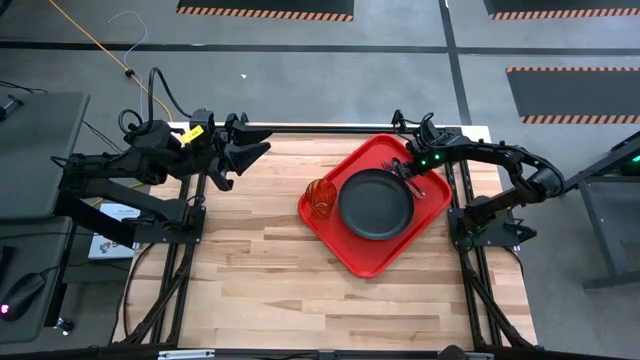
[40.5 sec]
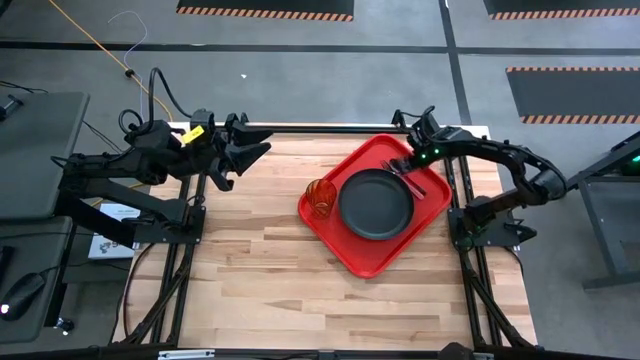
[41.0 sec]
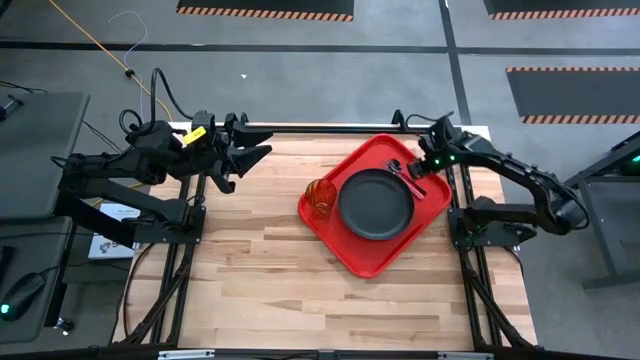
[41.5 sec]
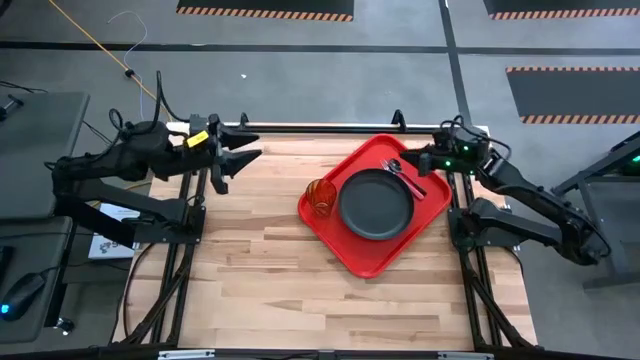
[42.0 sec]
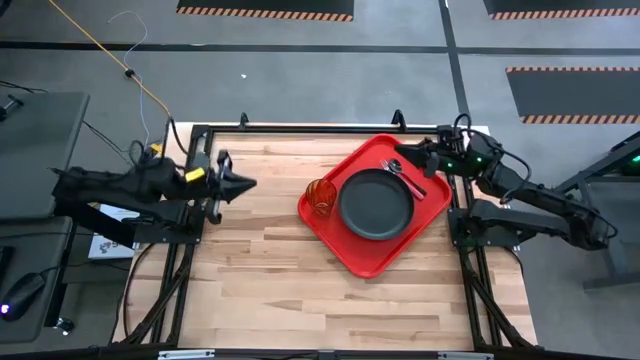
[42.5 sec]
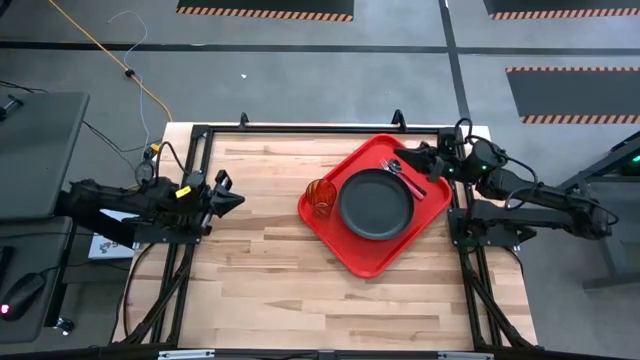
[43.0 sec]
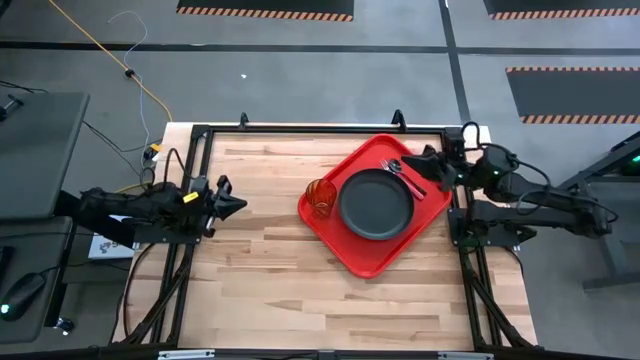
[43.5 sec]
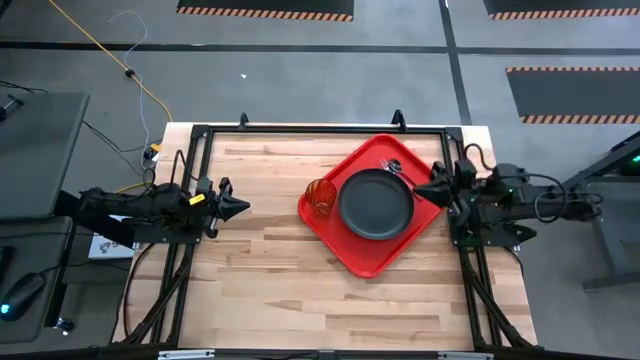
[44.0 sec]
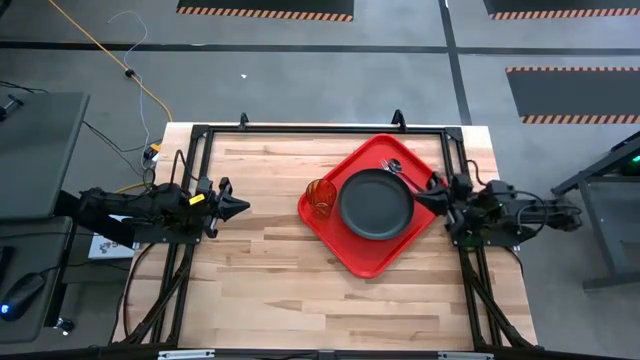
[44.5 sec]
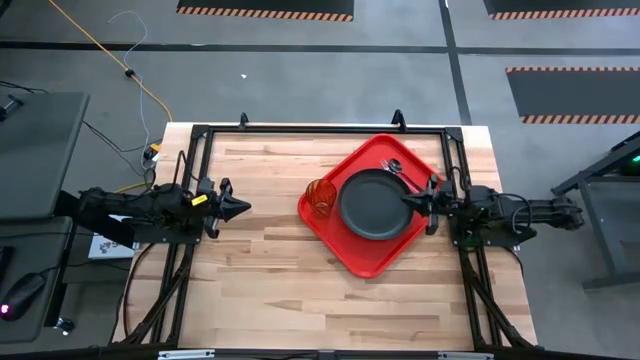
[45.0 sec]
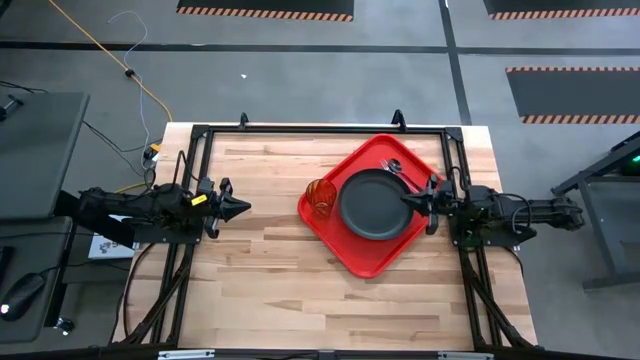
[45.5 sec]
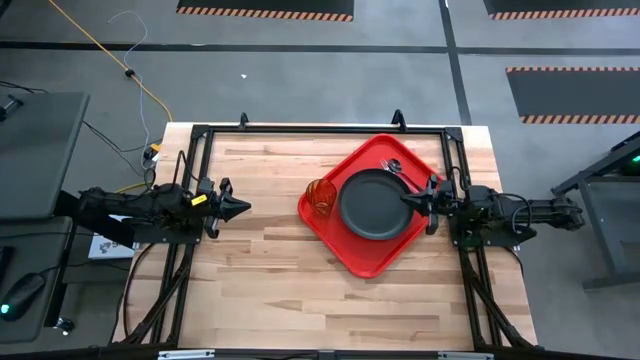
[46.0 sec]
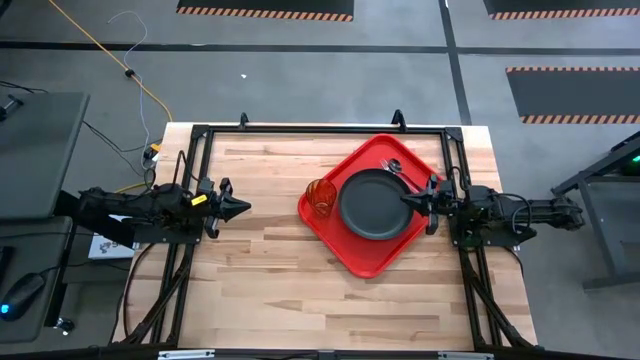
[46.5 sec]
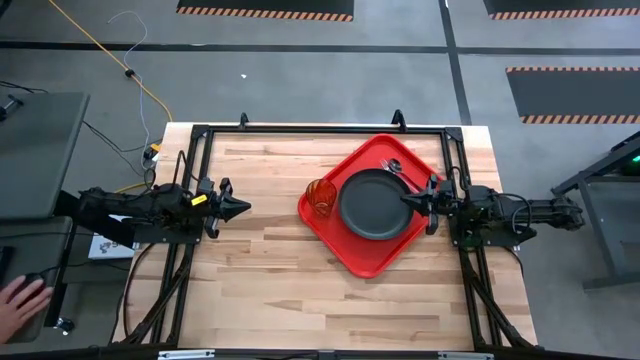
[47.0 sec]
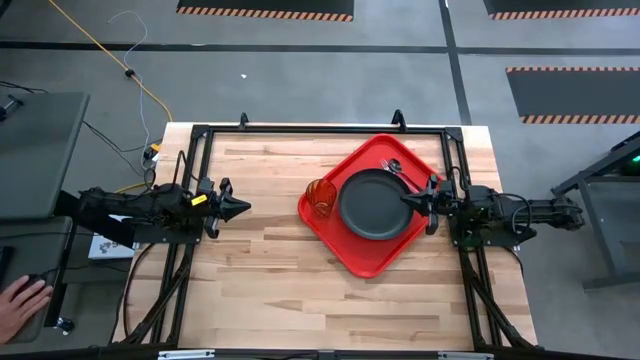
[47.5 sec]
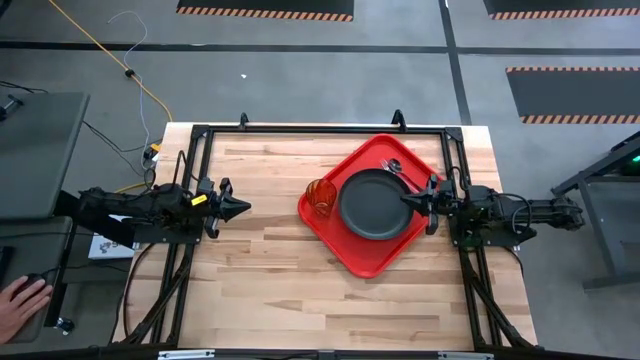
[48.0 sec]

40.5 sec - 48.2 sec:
Task: Pick and place plate/cup/fork/spoon on tray
Return to Home Position

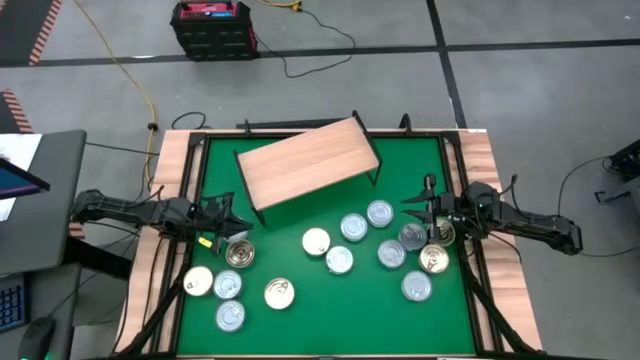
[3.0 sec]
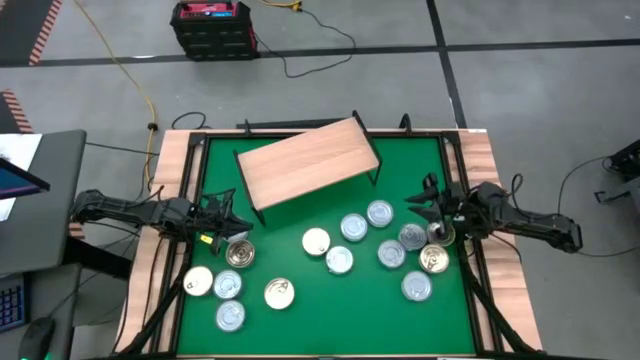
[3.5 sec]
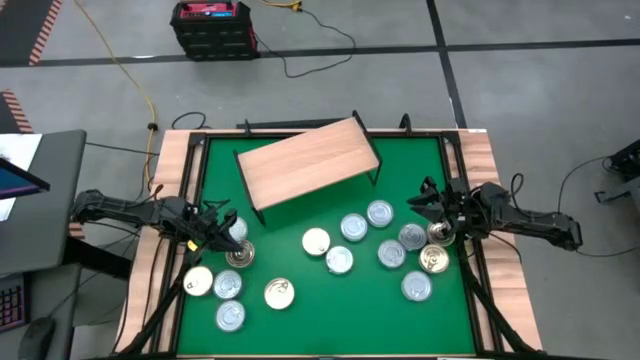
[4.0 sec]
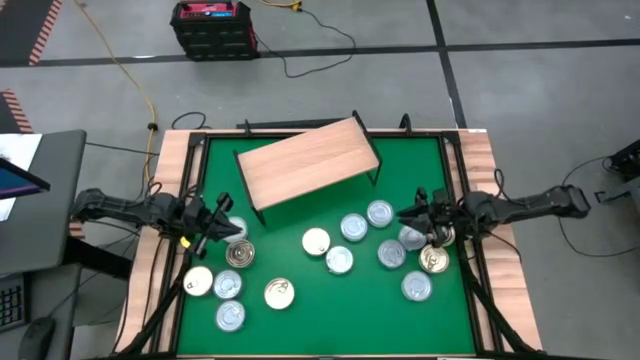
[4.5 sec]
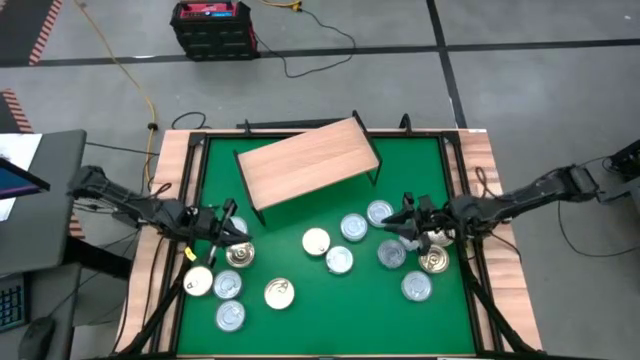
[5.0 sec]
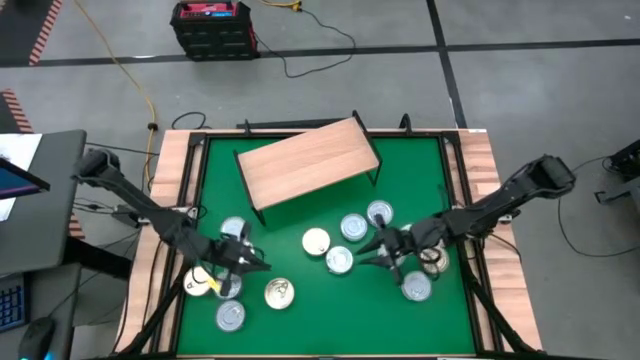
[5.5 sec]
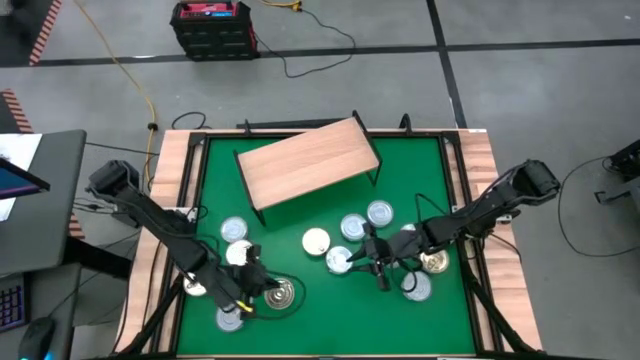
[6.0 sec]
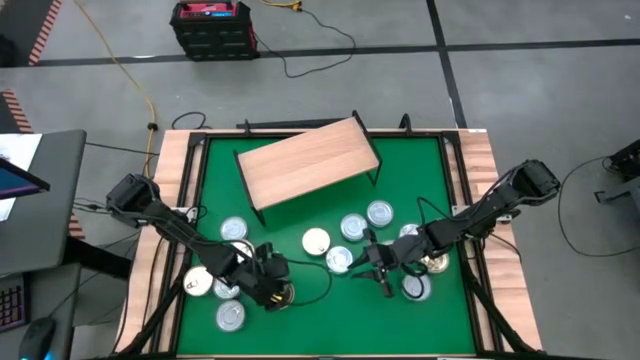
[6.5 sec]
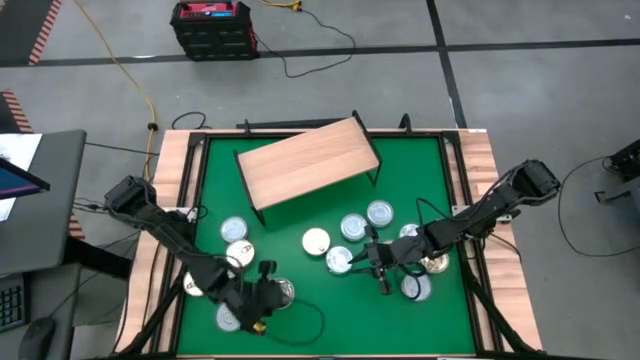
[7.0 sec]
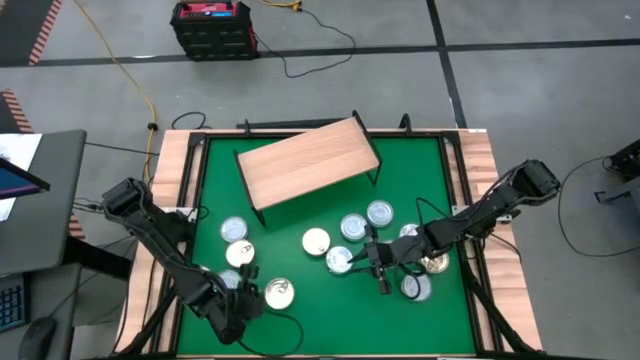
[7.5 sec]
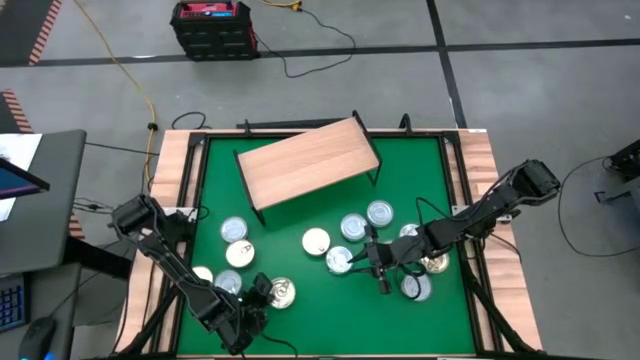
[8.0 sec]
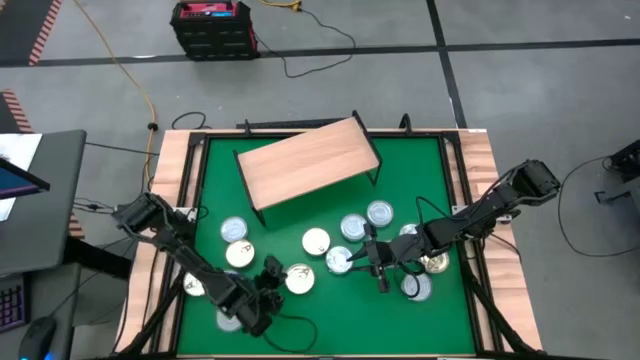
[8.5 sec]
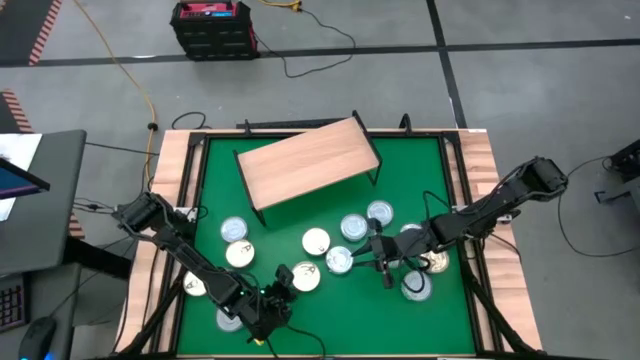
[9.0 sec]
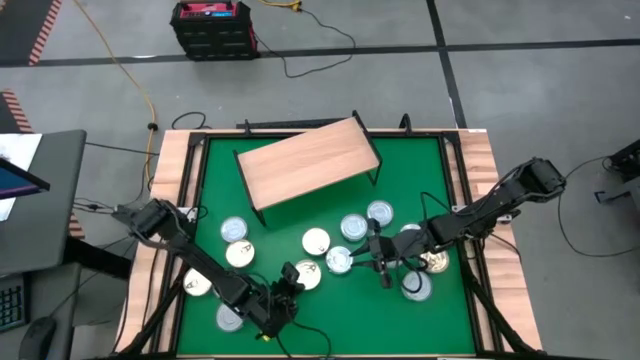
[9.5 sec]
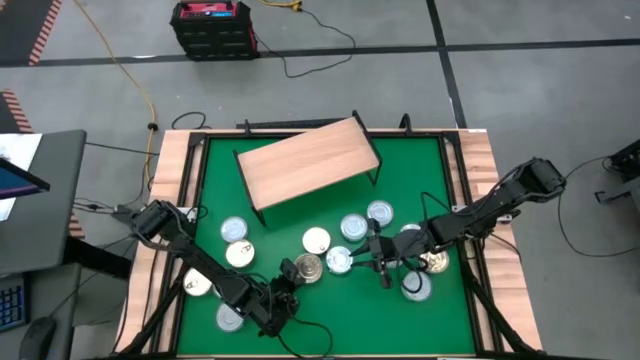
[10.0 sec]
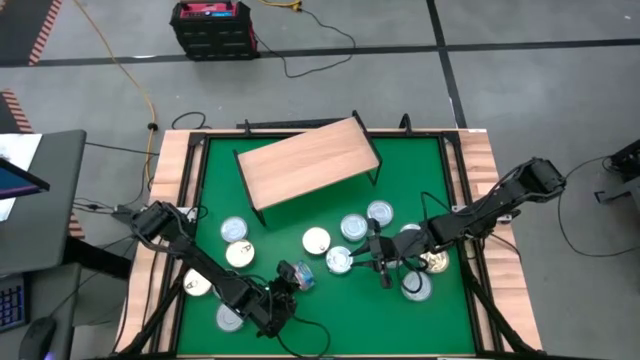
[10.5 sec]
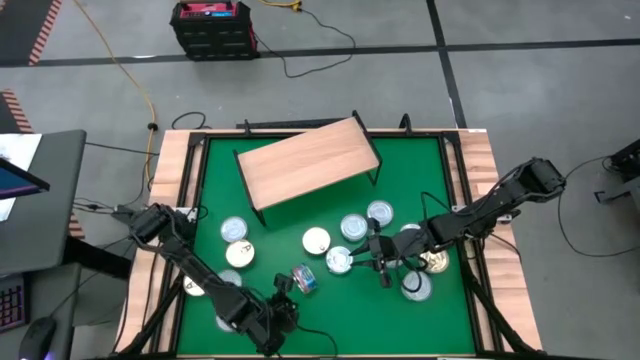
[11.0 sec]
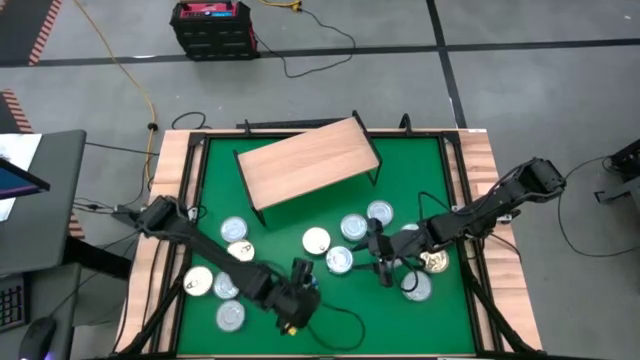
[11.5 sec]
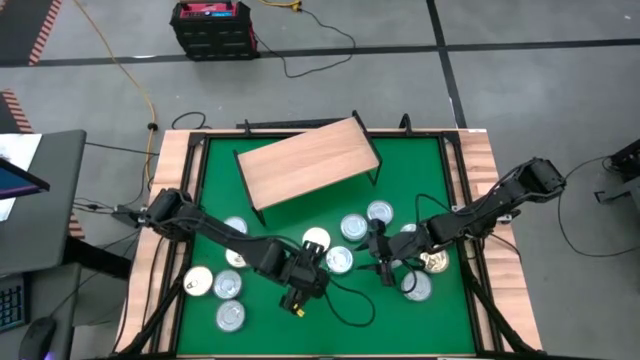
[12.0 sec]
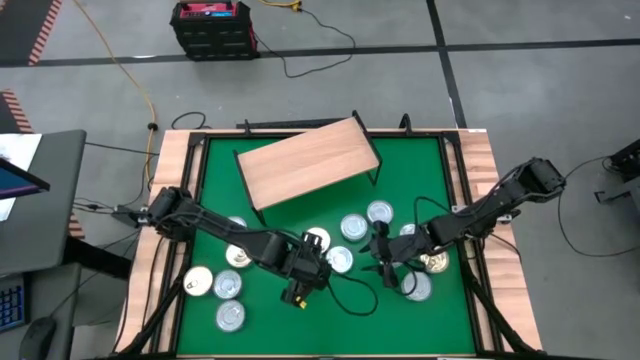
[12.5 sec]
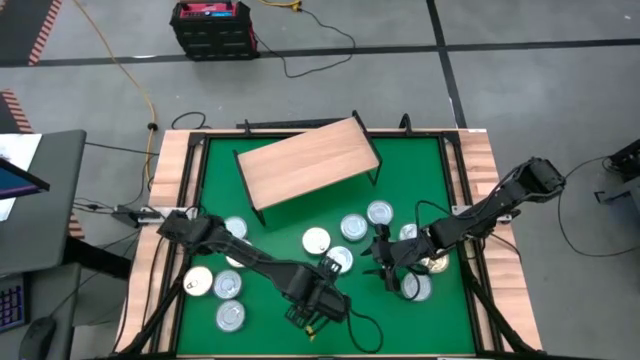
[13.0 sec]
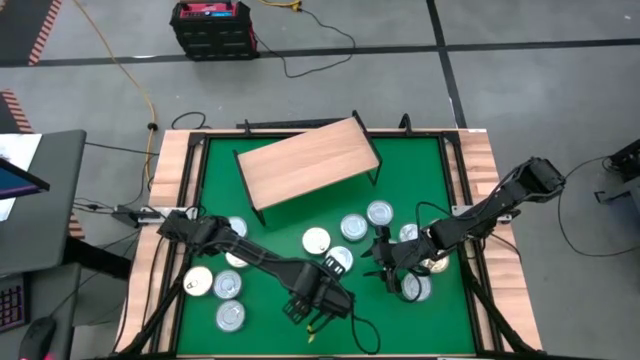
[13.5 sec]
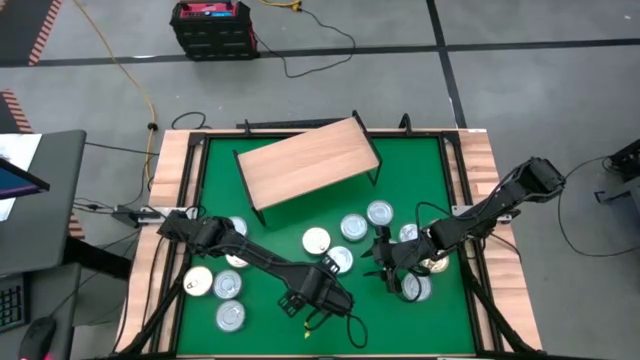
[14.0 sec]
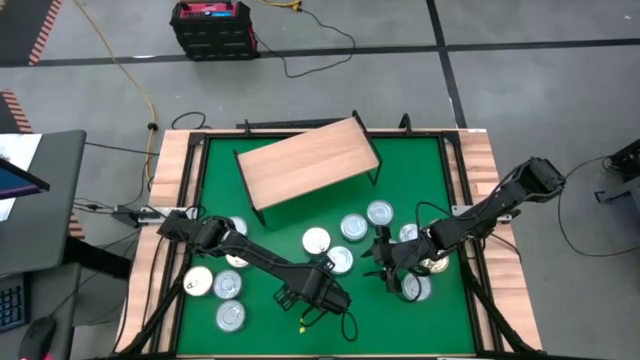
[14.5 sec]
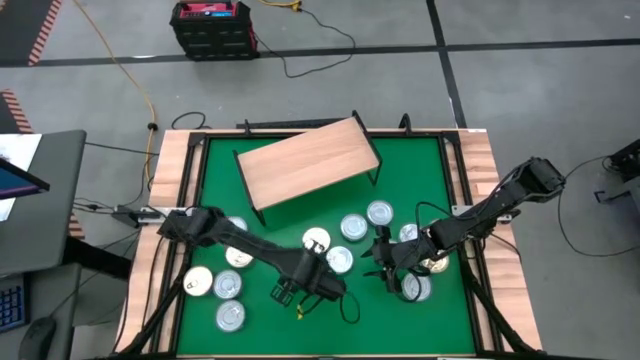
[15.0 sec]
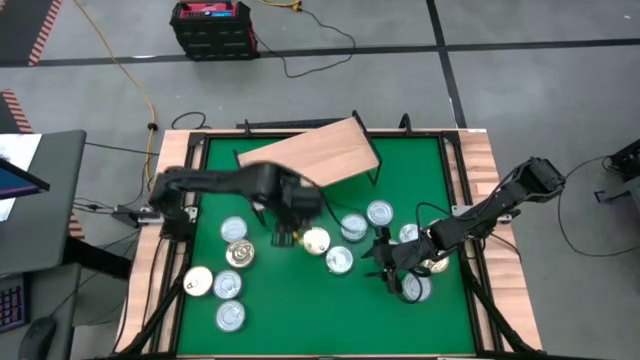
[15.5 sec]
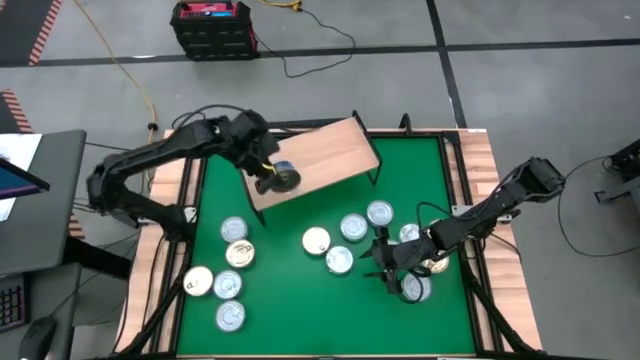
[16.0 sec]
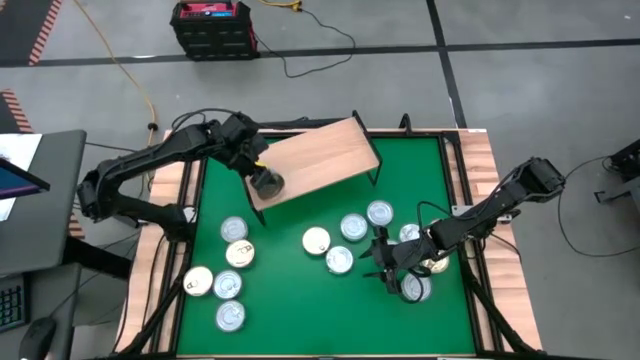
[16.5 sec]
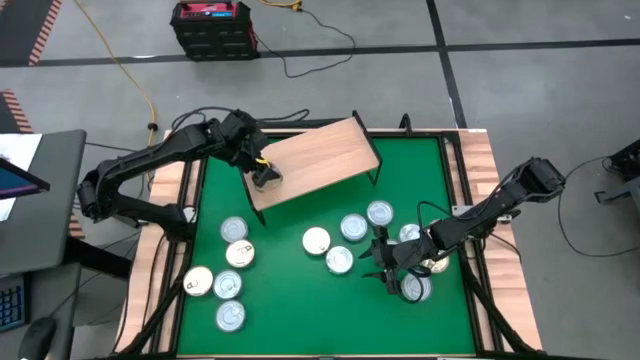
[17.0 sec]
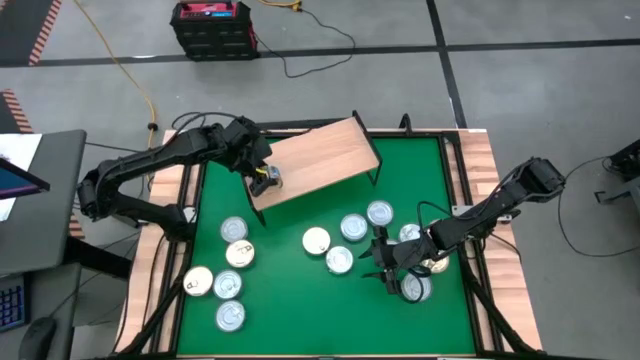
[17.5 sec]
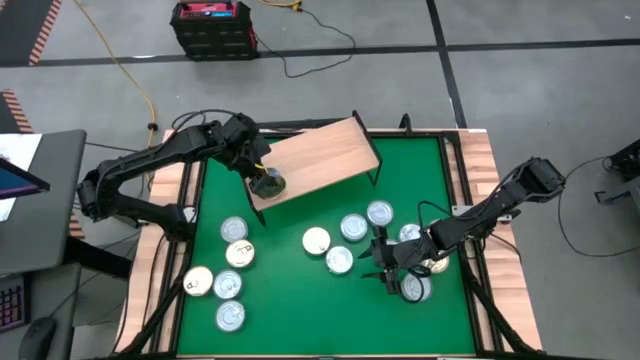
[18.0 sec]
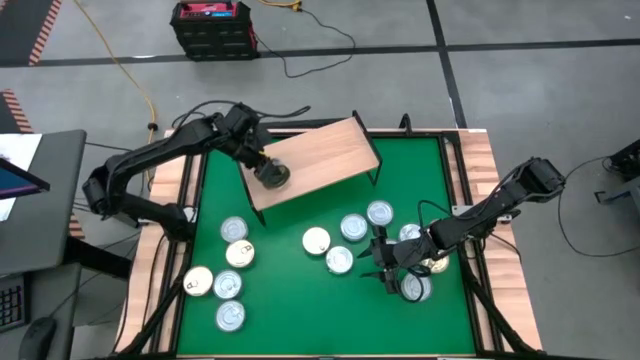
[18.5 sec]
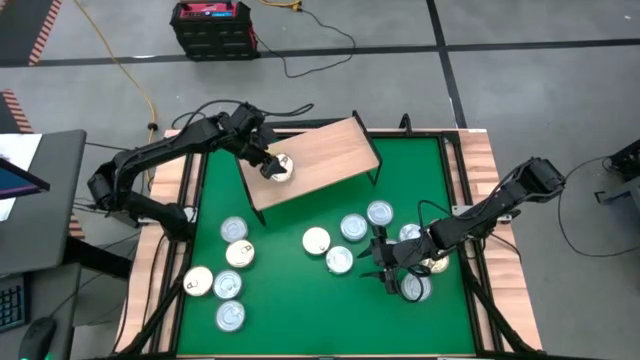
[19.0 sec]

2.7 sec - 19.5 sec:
Task: Stack canned seafood by type on shelf
Put the blue pink tuna can on the shelf
